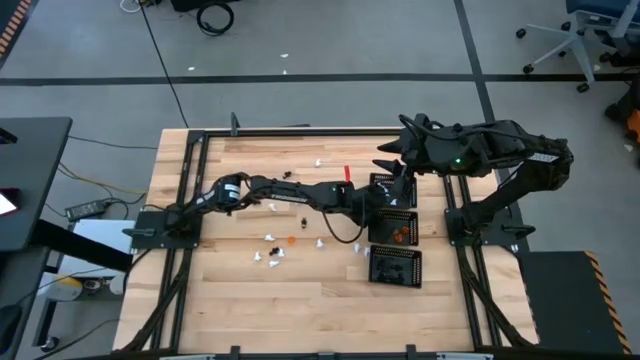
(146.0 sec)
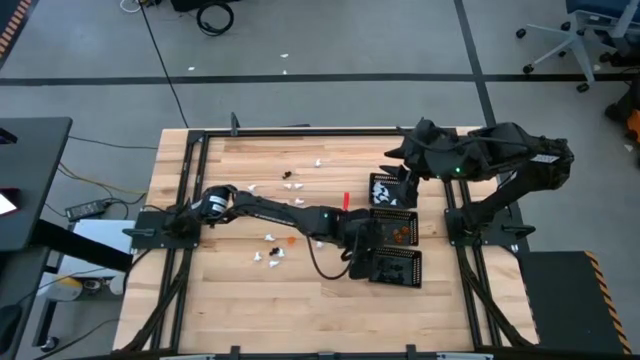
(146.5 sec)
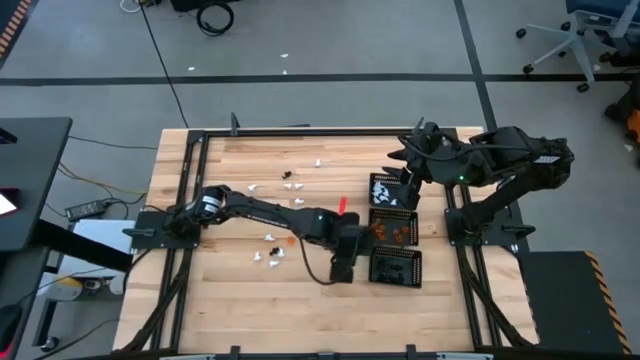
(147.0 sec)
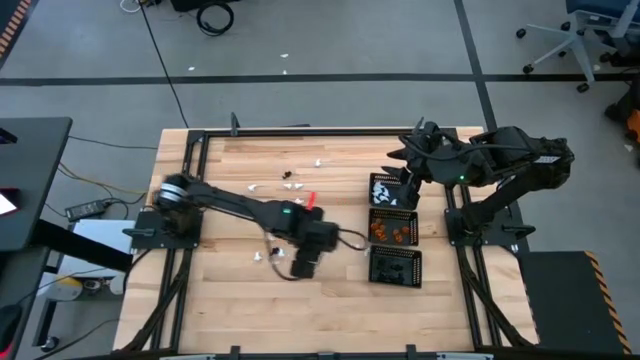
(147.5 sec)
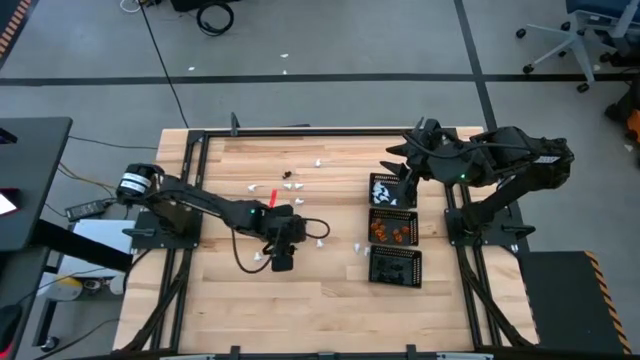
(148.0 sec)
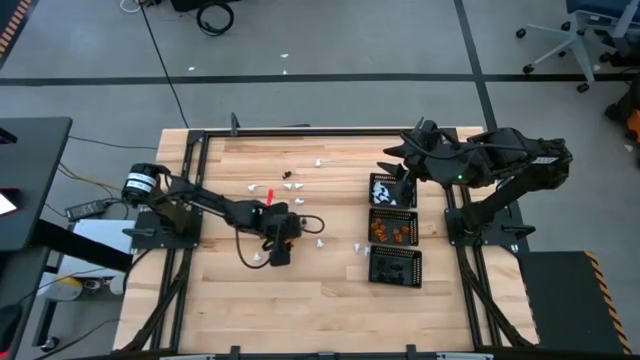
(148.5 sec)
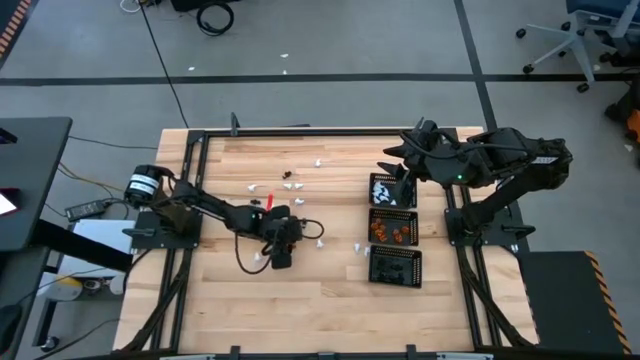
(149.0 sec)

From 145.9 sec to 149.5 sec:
Task: Sort Halloween decoration
Put the white ghost toy into the top black bin

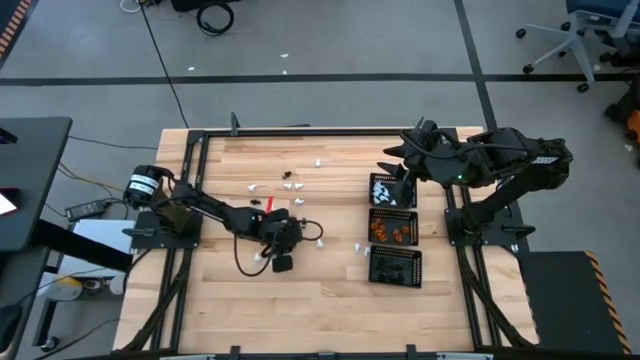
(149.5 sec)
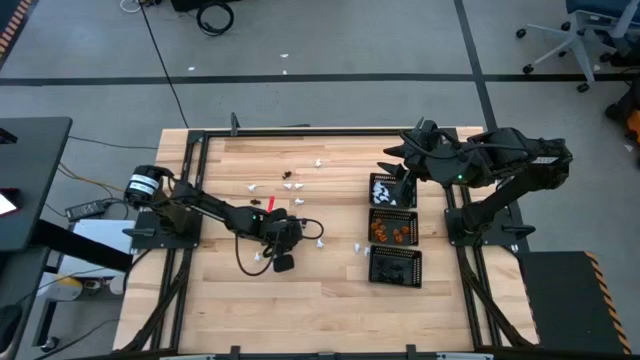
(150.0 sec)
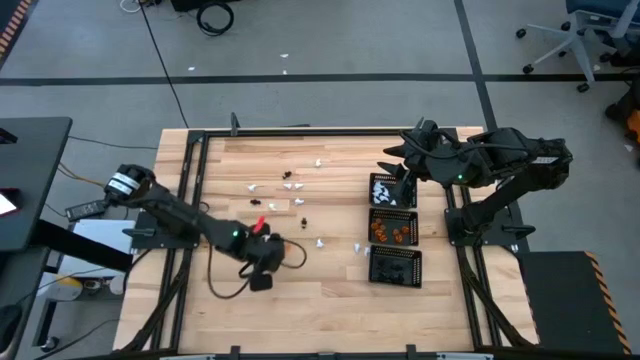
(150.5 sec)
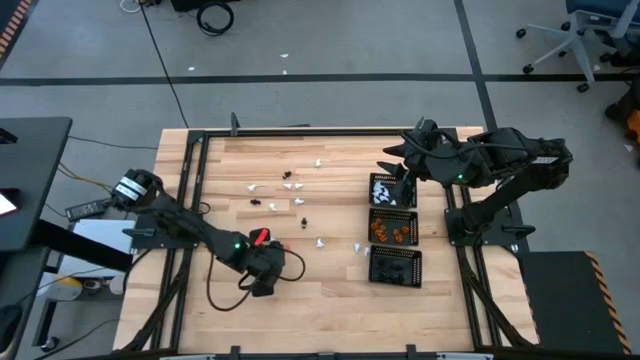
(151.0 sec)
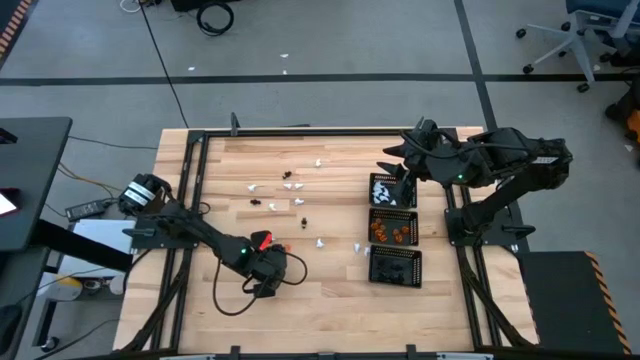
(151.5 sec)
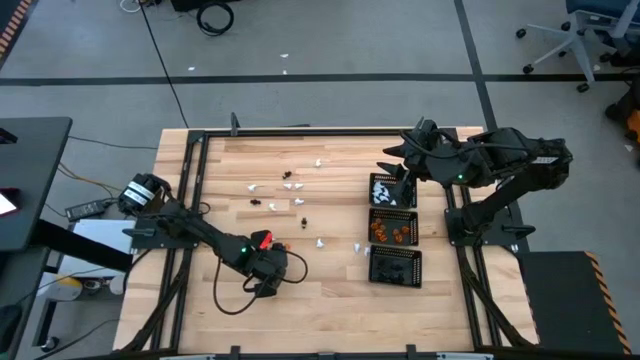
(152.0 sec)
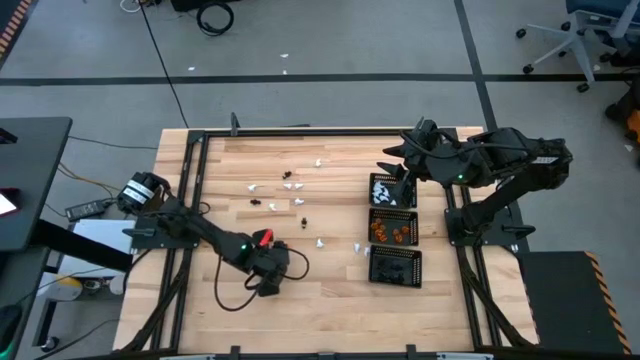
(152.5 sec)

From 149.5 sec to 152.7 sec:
Put the white ghost toy into the top black bin

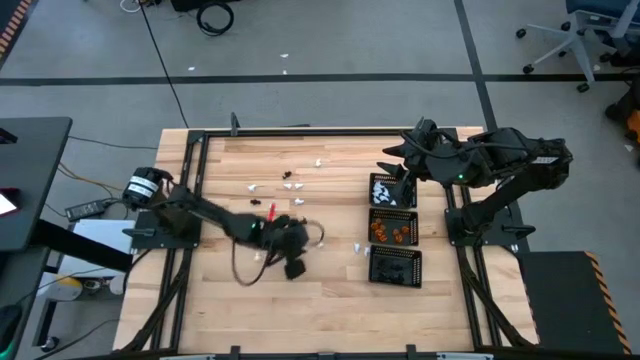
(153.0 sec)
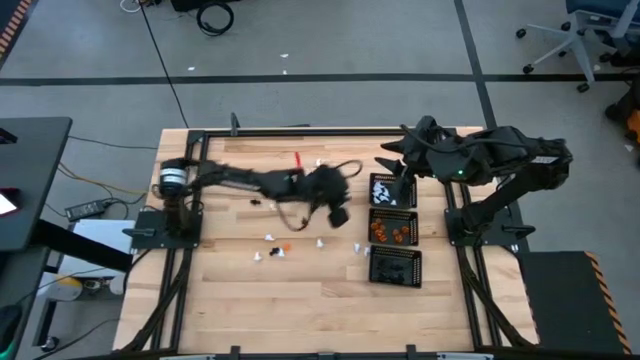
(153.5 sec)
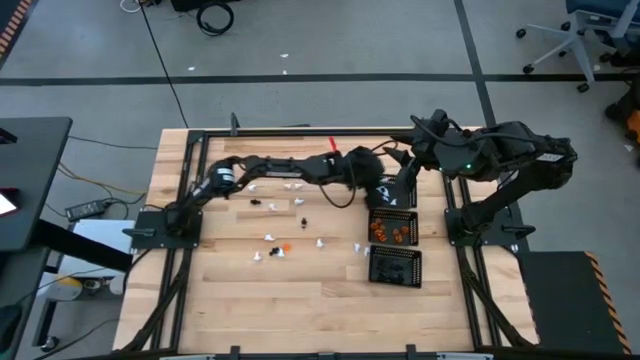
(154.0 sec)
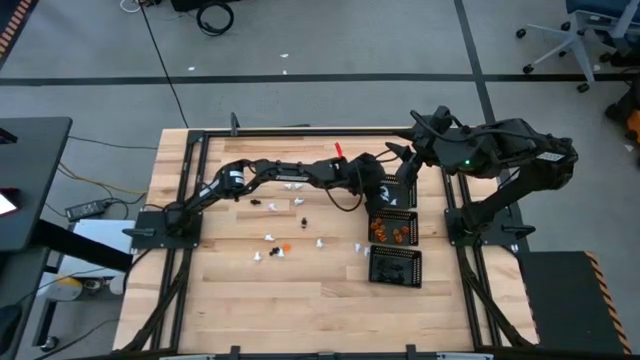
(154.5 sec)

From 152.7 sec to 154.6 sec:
Put the white ghost toy into the top black bin

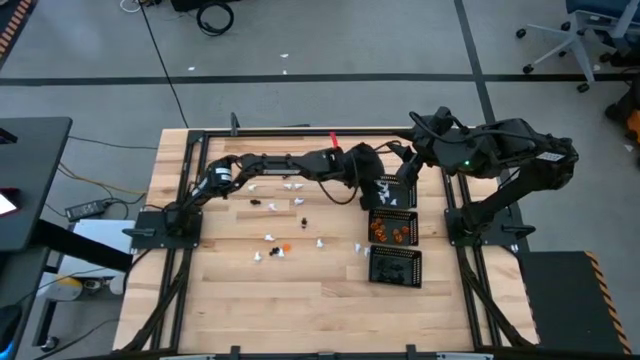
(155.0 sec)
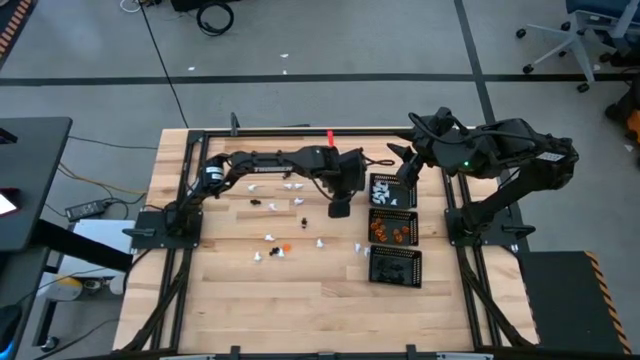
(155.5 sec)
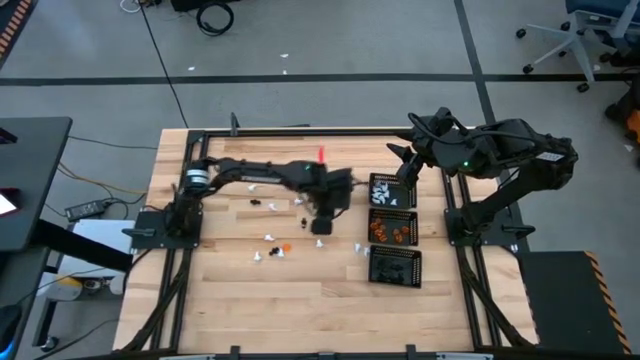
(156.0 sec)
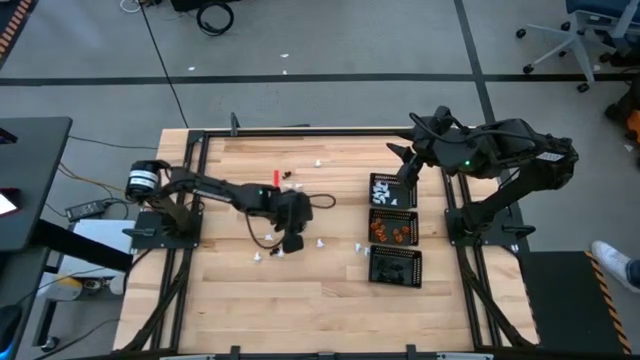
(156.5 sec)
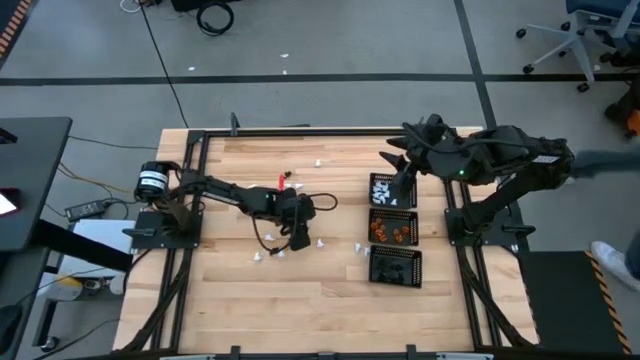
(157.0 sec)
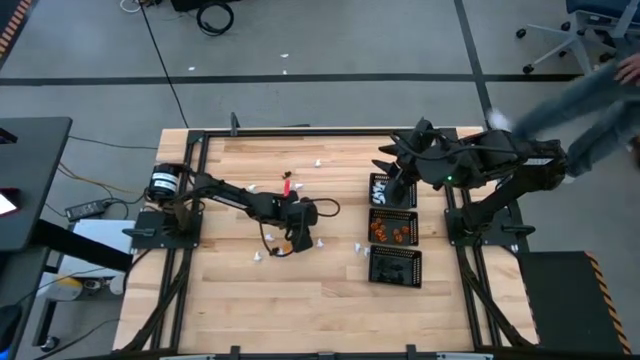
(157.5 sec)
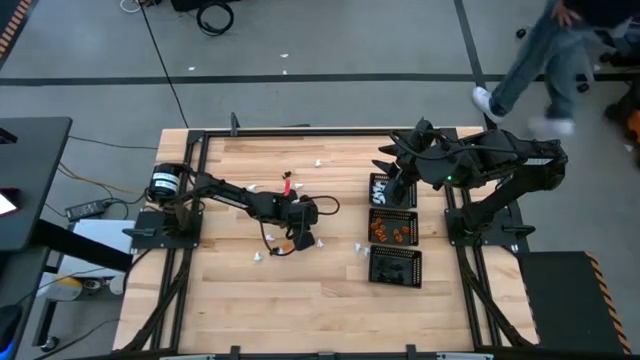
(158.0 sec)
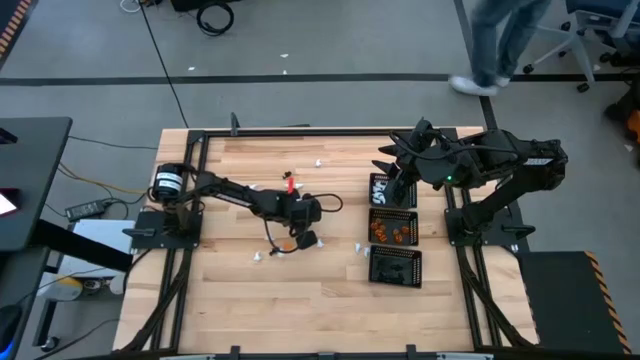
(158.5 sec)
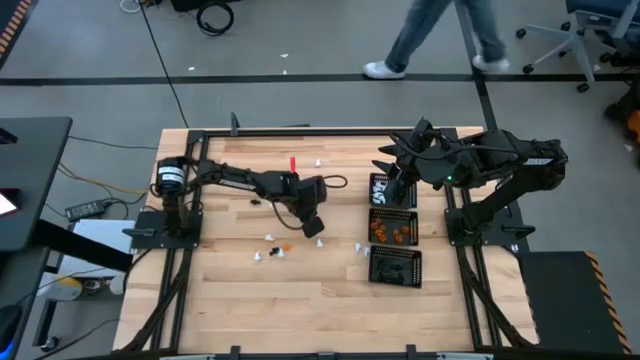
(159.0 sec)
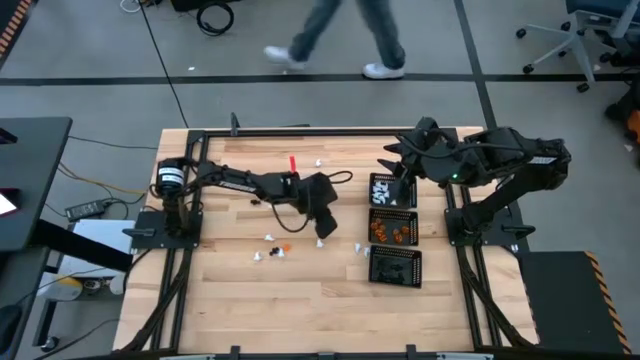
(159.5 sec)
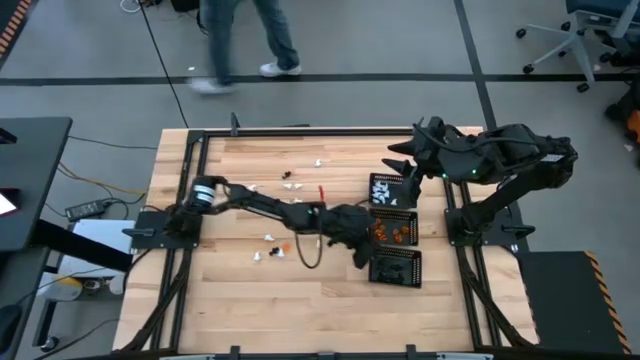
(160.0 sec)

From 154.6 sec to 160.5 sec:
Put the black ghost toy into the bottom black bin

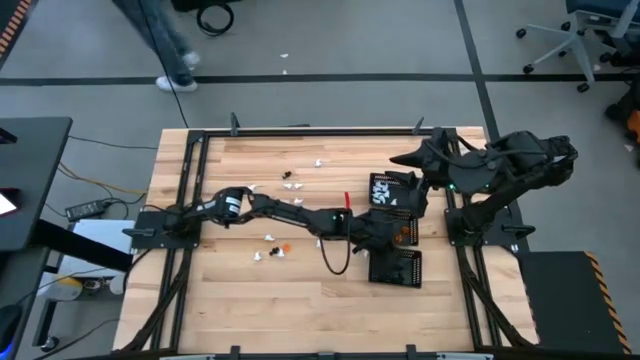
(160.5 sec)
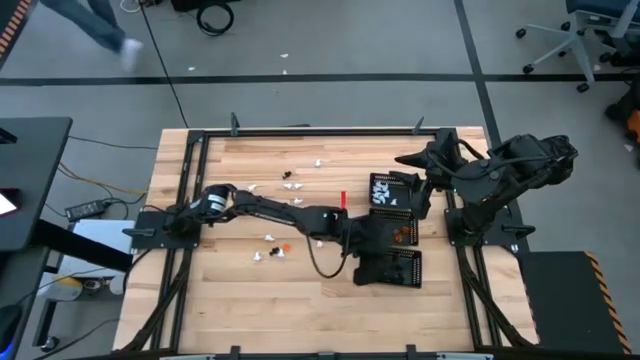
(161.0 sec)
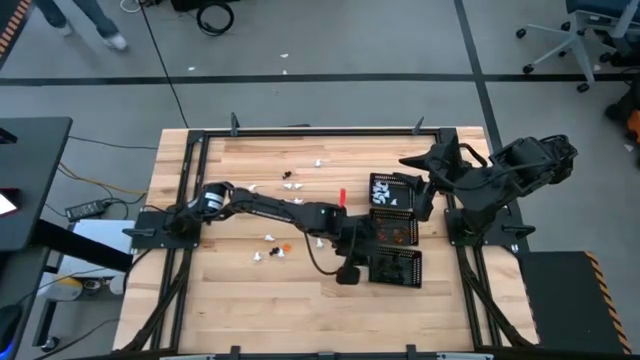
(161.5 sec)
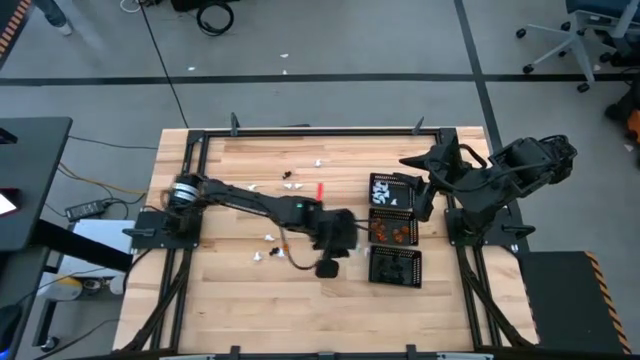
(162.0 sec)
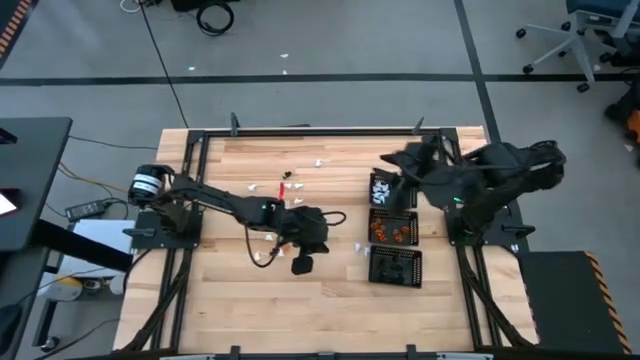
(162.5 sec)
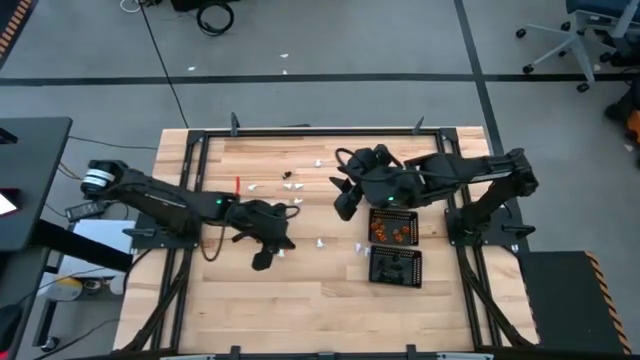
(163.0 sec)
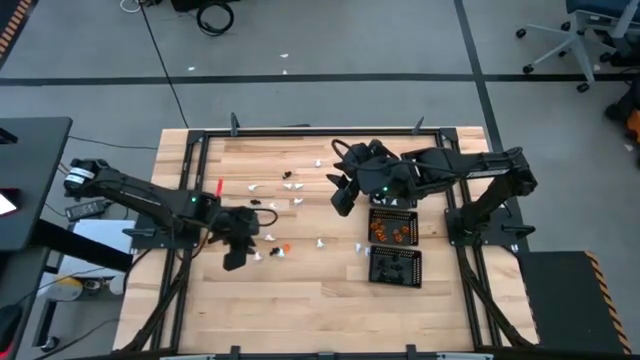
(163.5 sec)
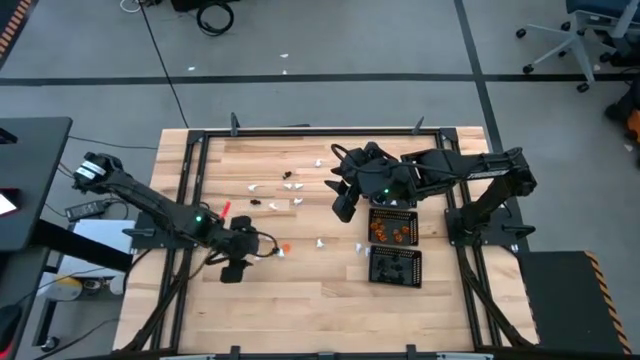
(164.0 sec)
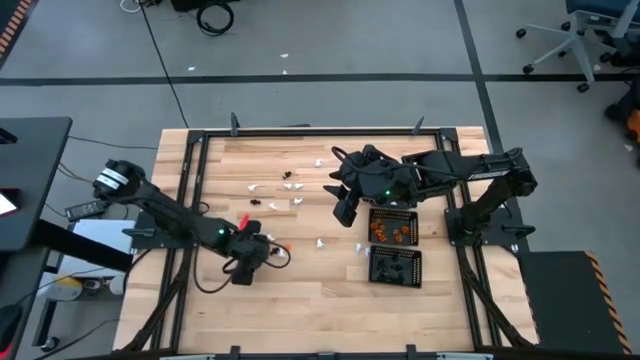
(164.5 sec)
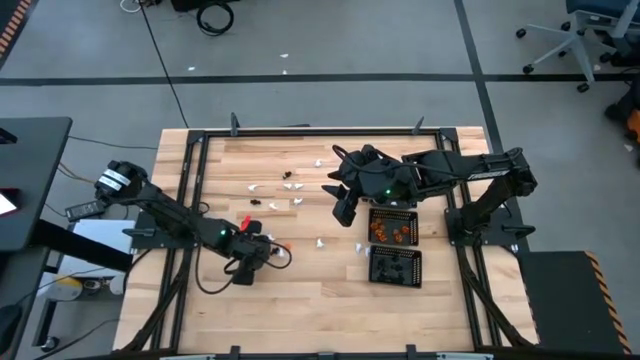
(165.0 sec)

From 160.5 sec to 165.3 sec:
Put the white ghost toy into the top black bin
